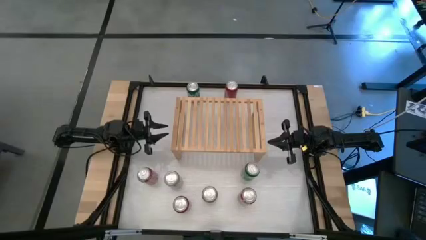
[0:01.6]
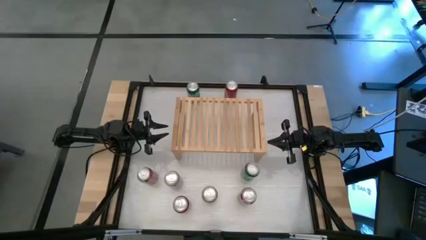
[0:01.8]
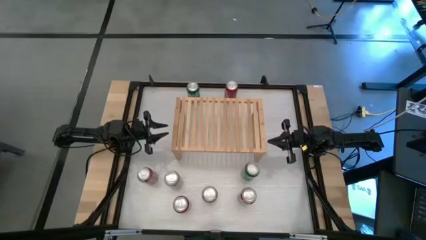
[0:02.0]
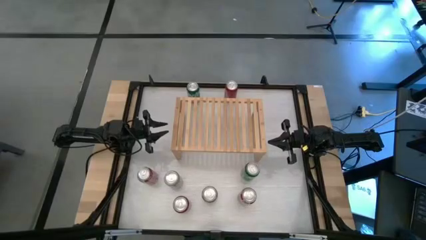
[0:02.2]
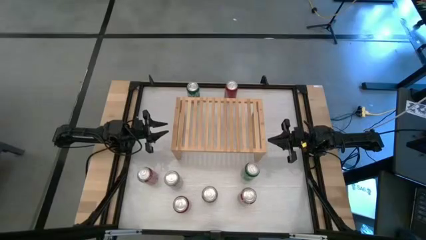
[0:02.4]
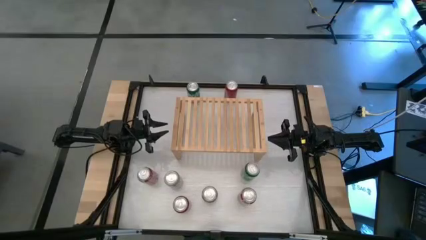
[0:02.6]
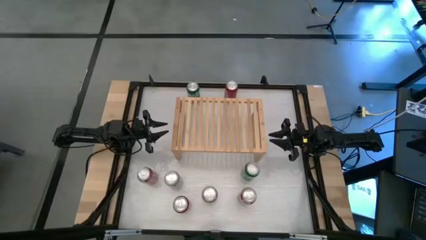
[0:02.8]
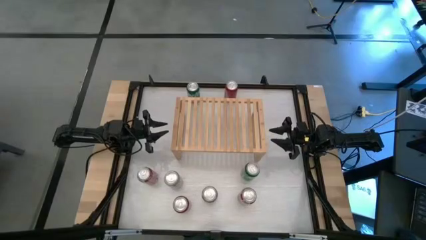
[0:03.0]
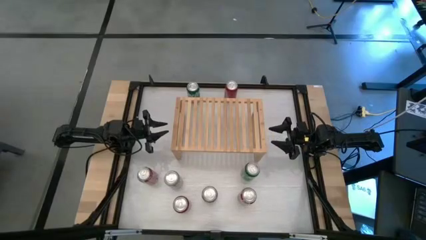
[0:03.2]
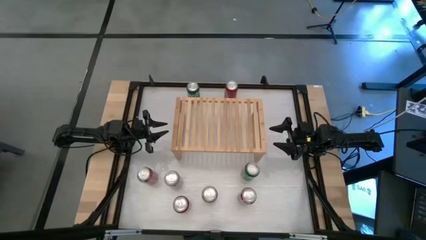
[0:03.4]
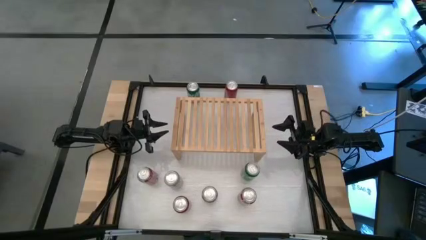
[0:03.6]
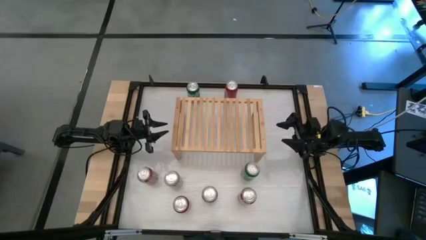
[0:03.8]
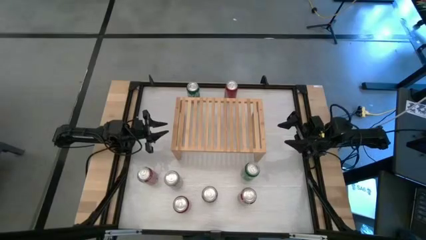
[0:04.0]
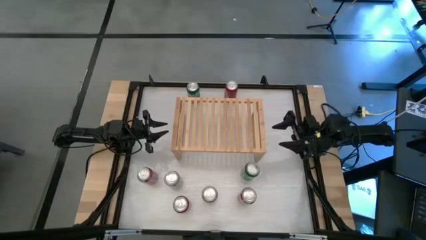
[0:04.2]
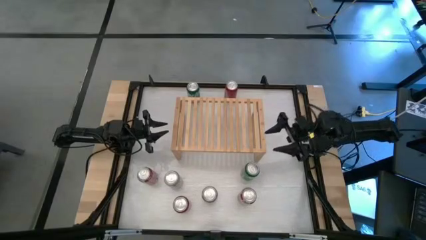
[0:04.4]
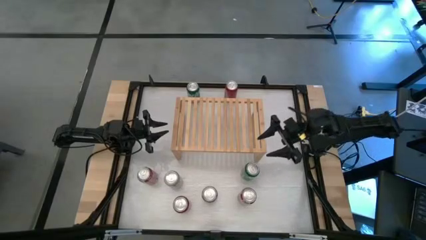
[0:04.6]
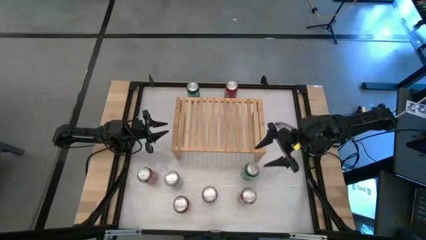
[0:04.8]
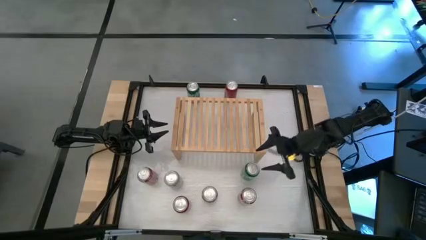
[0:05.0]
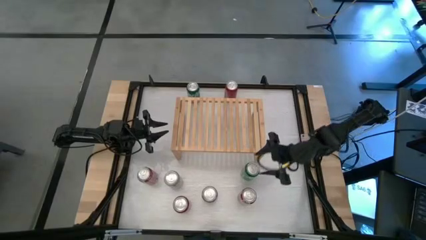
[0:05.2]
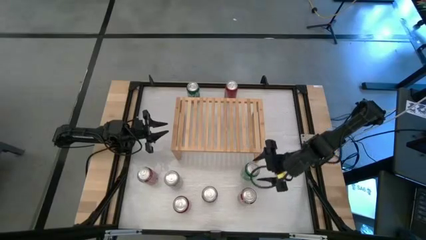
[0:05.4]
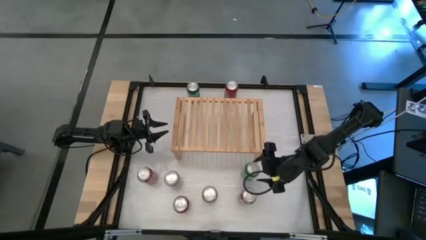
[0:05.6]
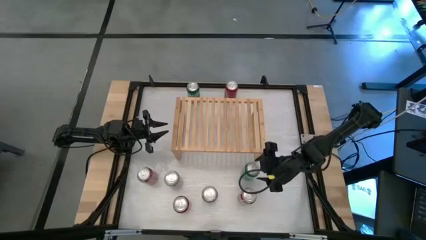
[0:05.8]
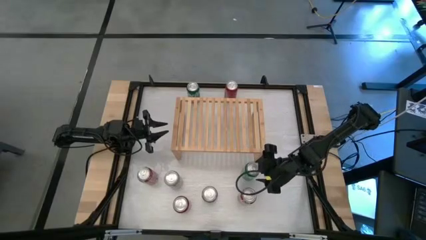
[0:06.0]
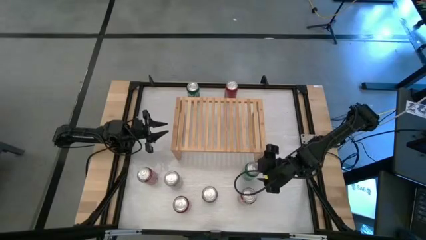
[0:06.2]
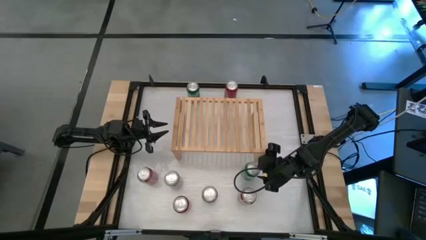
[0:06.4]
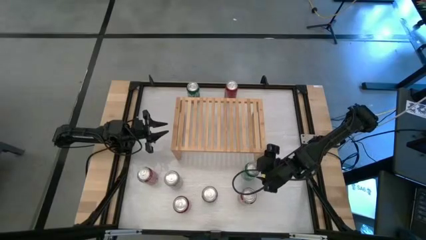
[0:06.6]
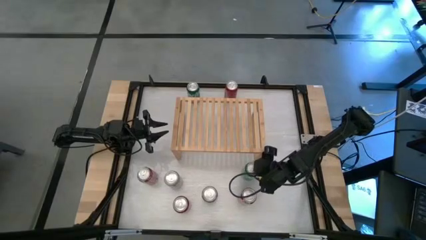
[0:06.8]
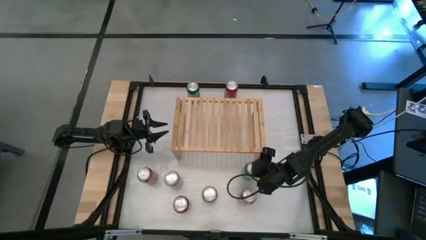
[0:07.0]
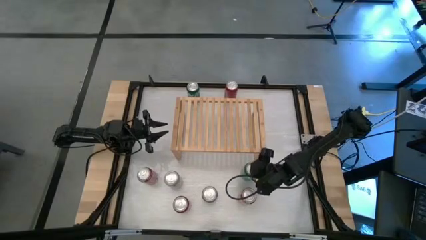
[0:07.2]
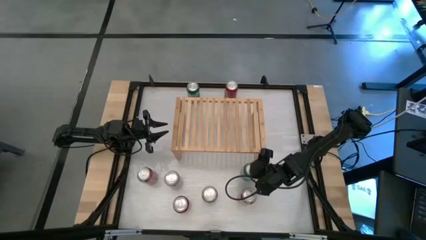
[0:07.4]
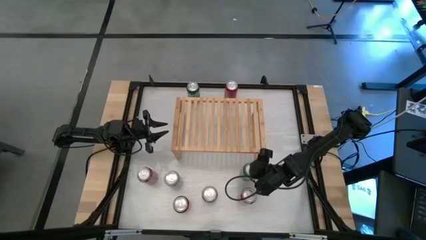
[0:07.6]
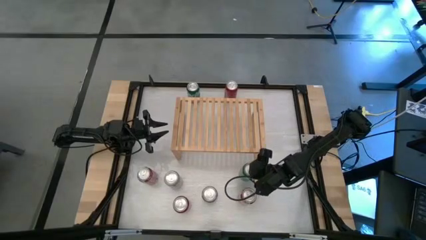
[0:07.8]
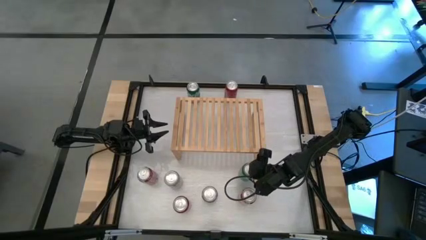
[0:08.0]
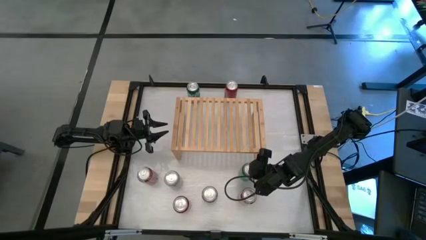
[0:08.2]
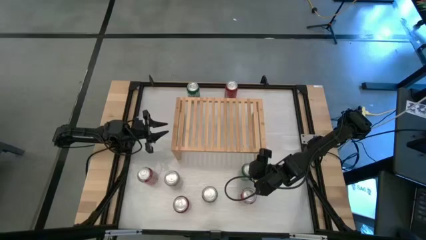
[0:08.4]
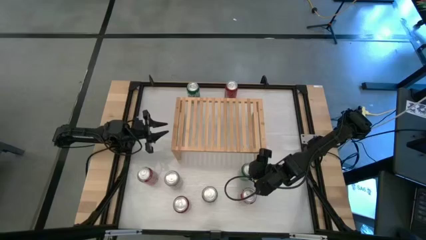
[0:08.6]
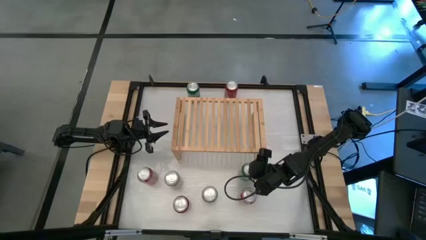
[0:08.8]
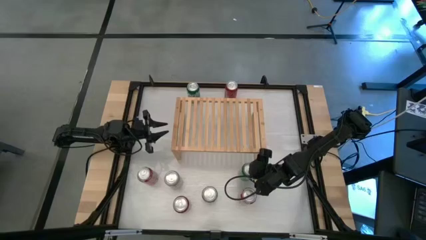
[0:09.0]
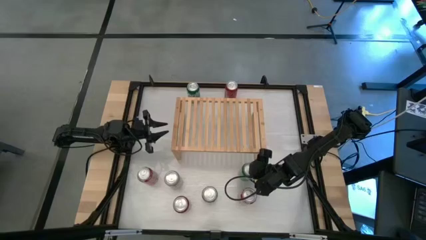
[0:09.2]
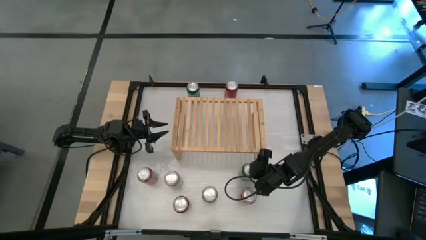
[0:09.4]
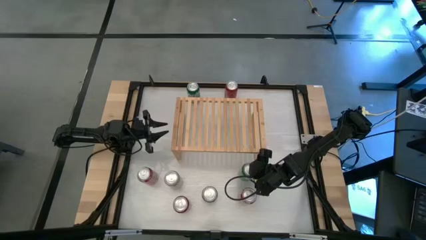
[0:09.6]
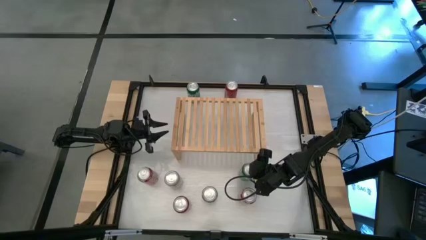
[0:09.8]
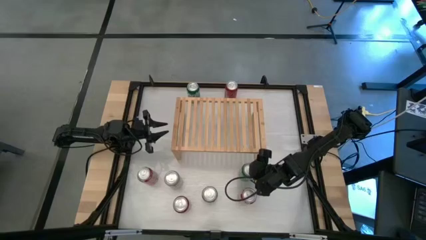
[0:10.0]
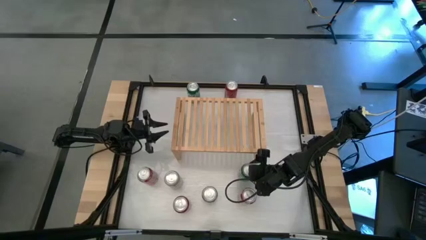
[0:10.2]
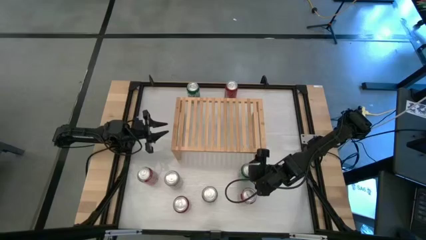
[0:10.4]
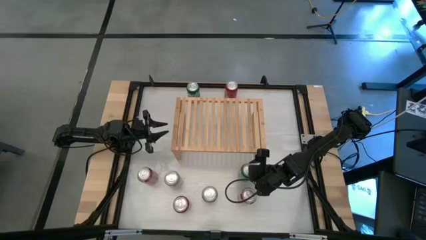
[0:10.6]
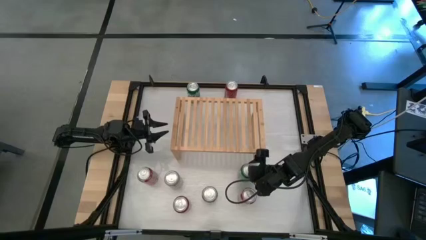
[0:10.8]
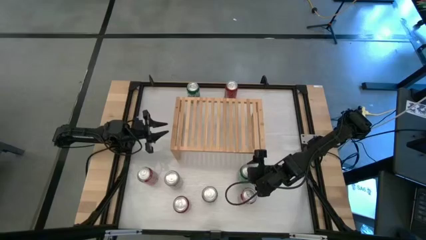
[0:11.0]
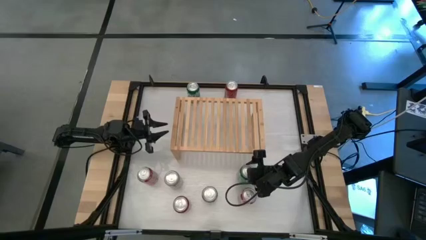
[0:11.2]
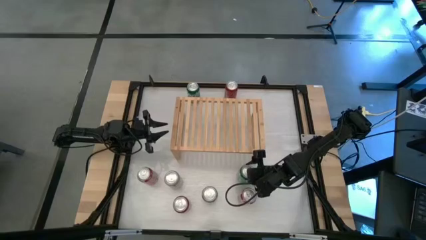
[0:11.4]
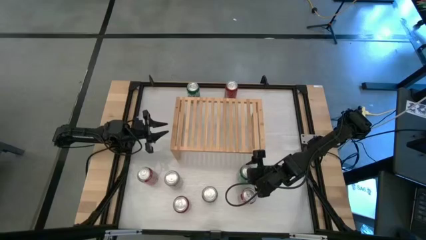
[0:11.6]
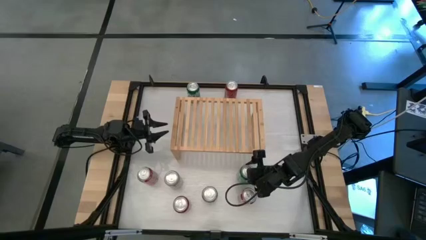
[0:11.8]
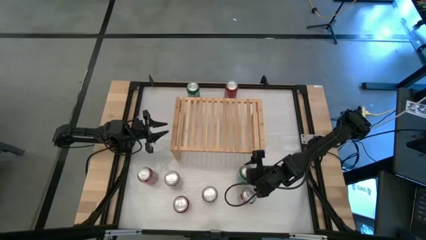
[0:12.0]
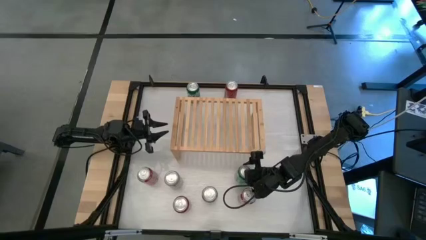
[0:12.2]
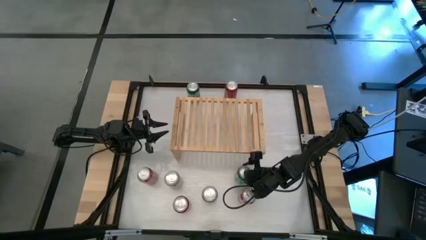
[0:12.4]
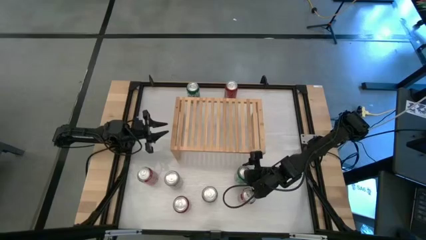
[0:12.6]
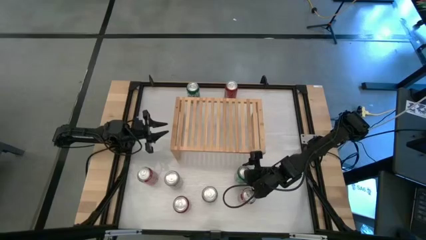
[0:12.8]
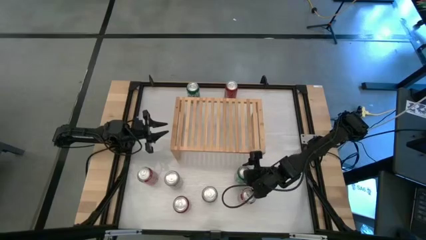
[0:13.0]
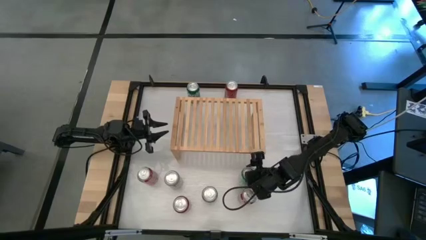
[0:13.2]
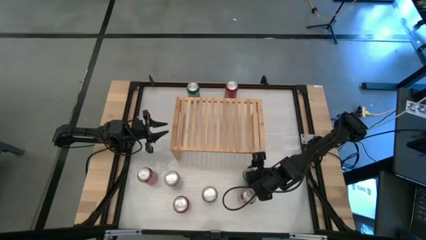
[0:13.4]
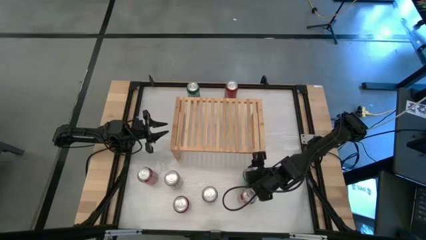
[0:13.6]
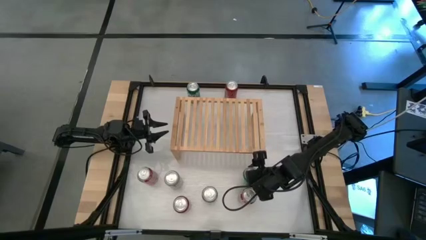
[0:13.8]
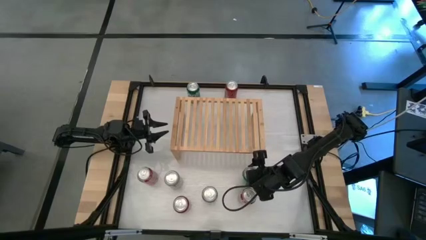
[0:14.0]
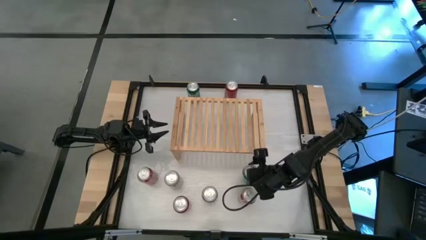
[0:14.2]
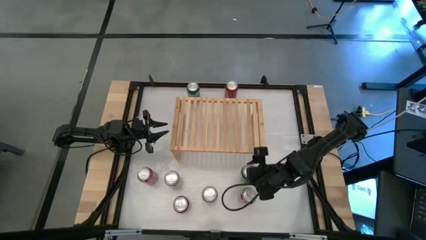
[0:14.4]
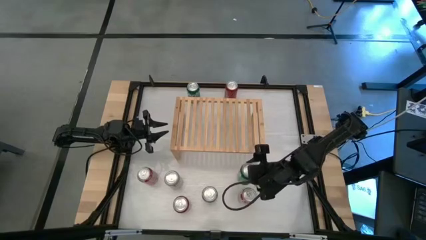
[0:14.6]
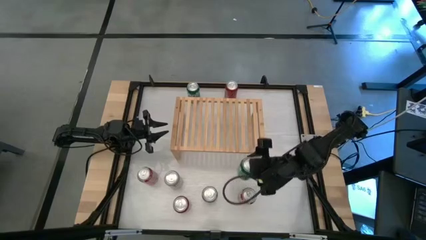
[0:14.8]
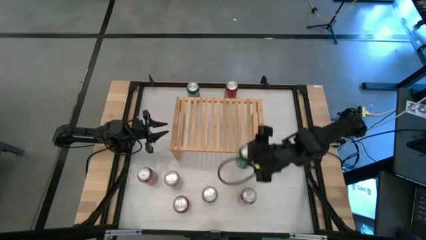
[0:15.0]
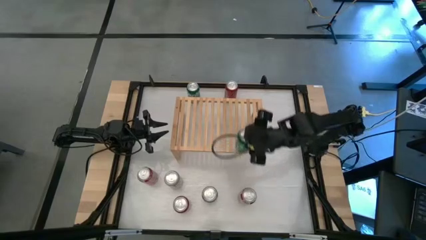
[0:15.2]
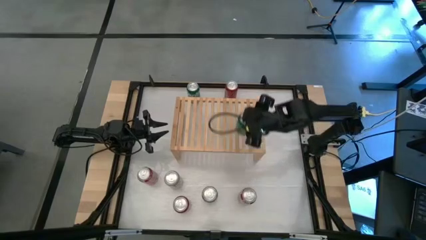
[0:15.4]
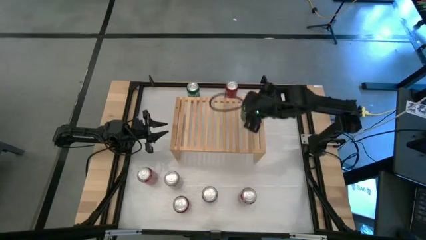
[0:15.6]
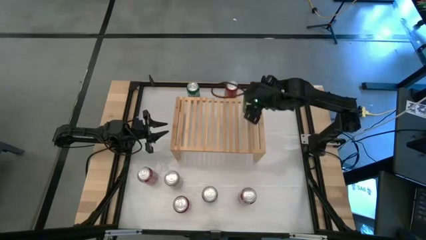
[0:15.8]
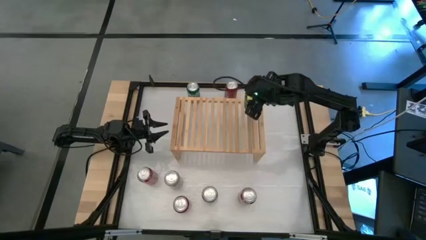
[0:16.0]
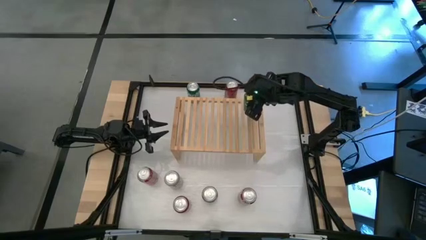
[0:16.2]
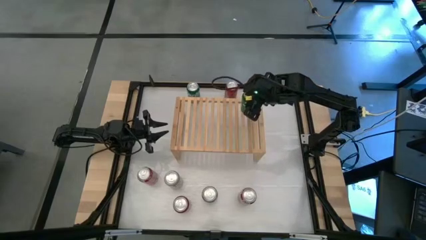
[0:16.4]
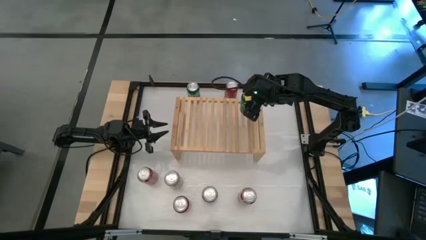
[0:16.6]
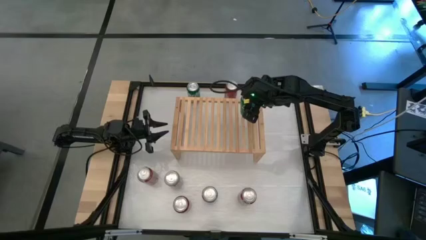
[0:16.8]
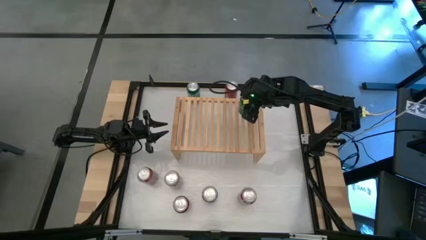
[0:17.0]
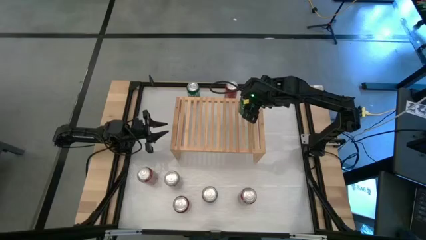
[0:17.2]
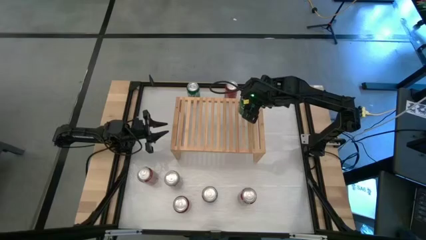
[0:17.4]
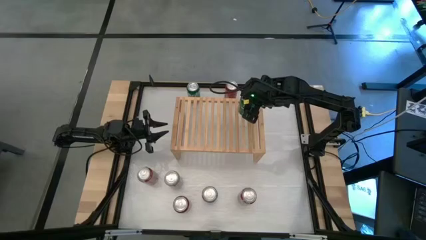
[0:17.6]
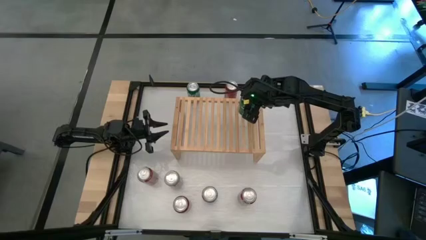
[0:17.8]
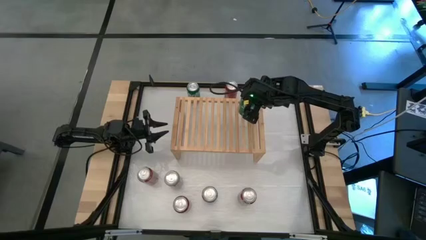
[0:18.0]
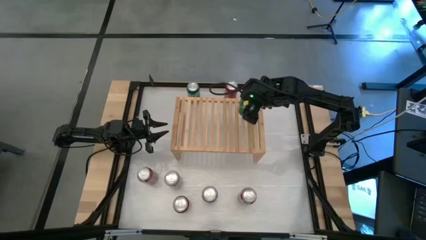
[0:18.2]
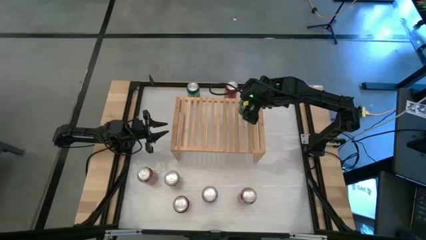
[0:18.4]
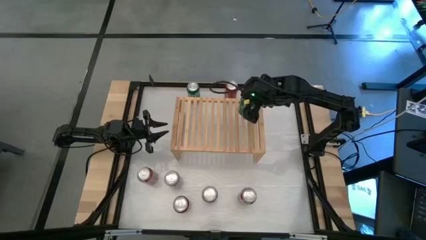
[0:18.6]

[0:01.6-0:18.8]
Task: Place canned beverage on shelf
Put the bottom green soda can on the shelf
